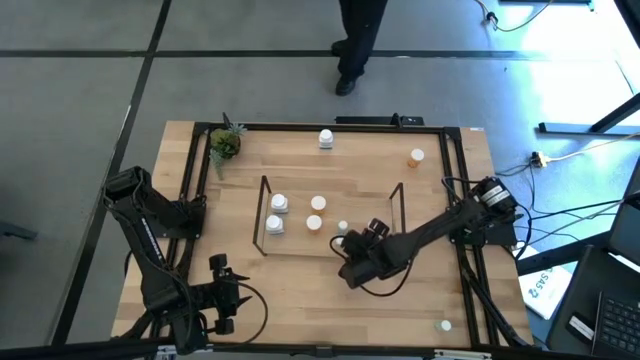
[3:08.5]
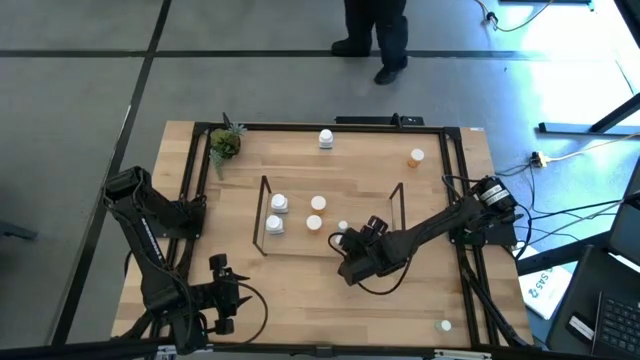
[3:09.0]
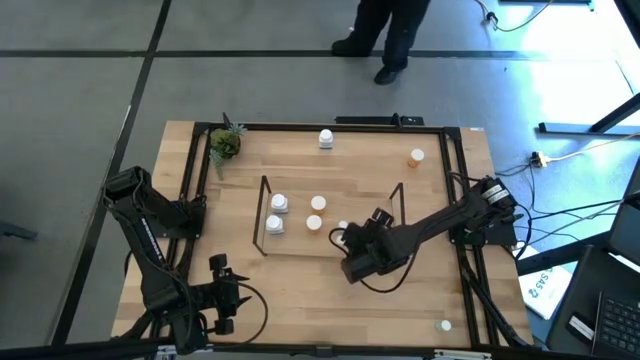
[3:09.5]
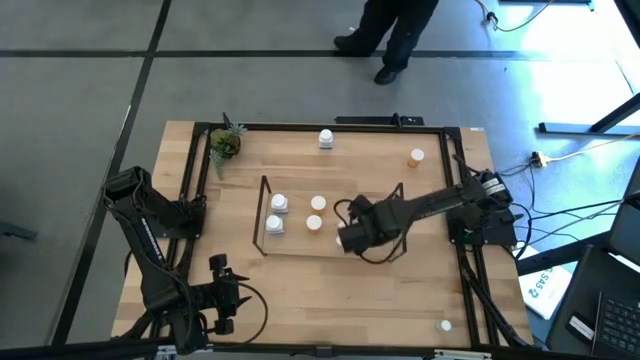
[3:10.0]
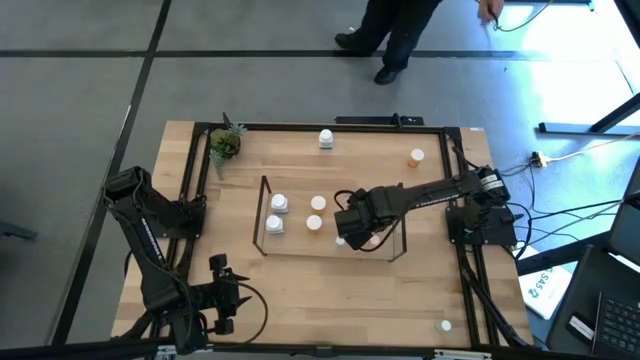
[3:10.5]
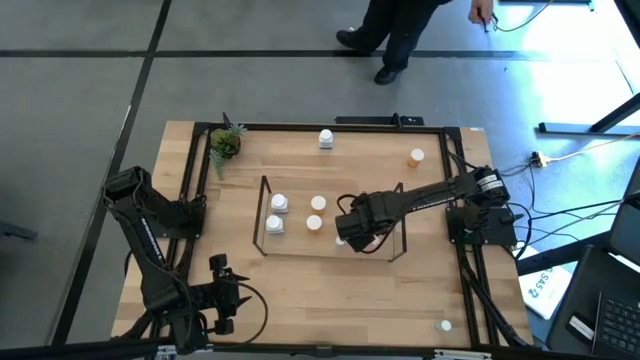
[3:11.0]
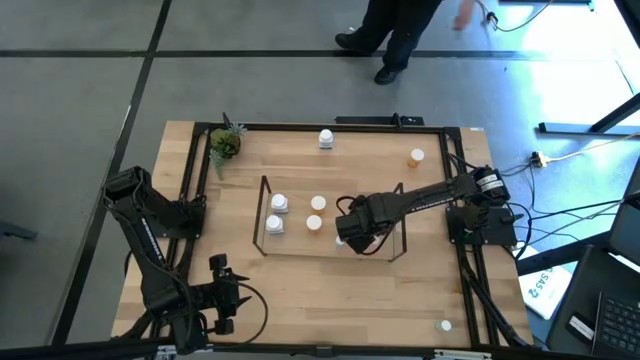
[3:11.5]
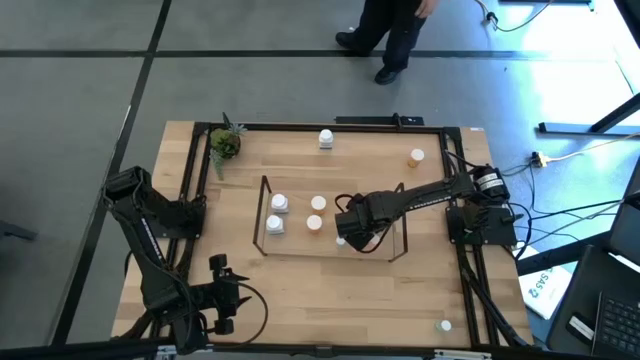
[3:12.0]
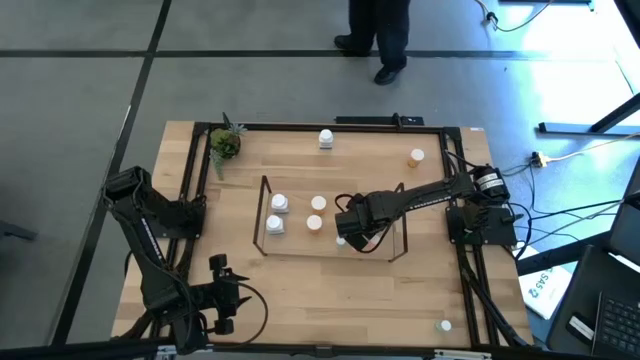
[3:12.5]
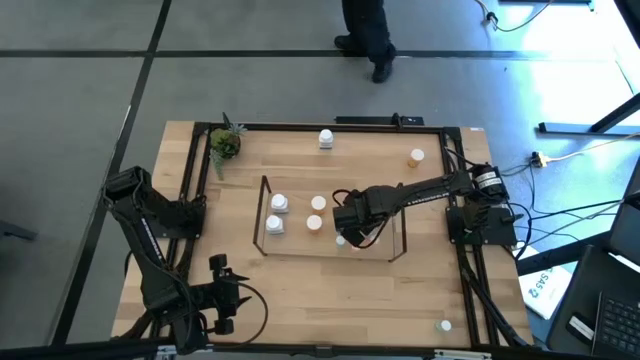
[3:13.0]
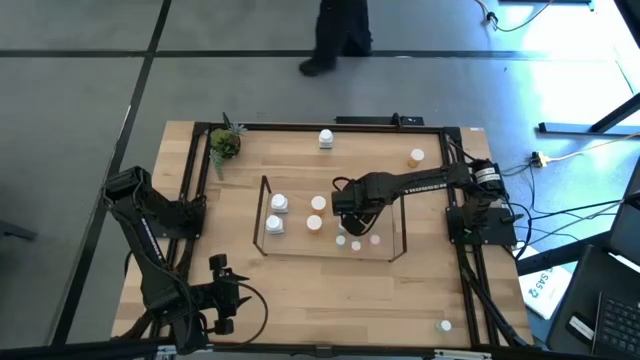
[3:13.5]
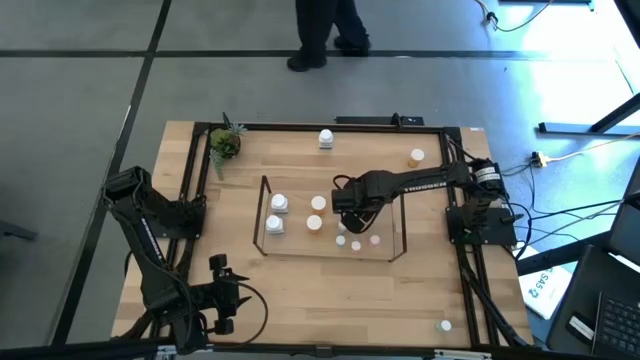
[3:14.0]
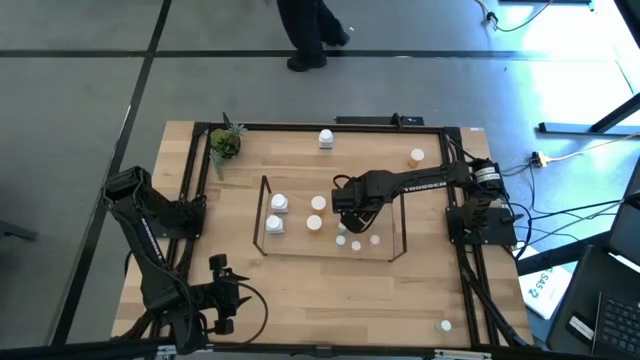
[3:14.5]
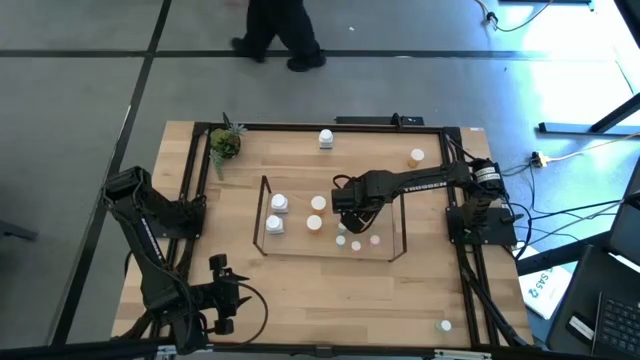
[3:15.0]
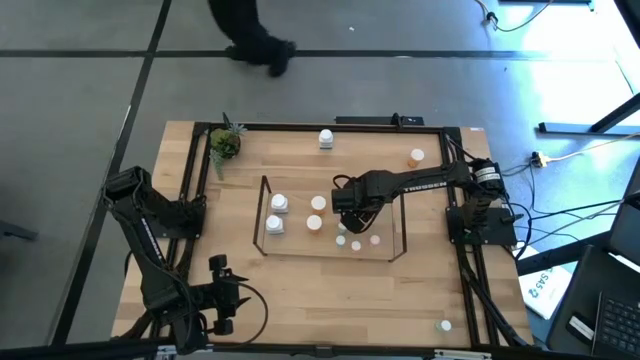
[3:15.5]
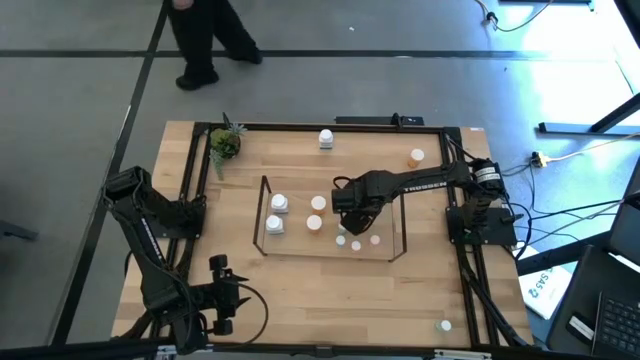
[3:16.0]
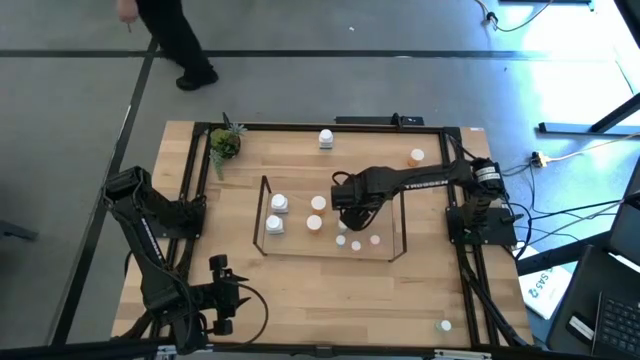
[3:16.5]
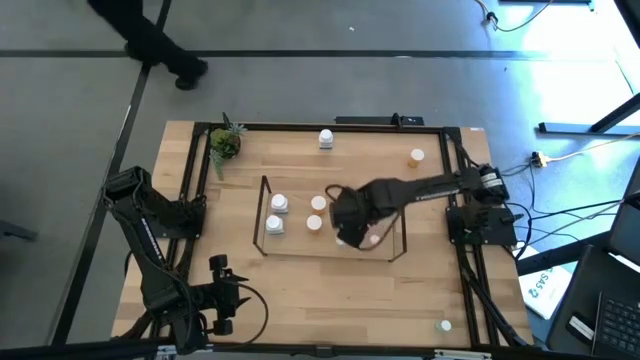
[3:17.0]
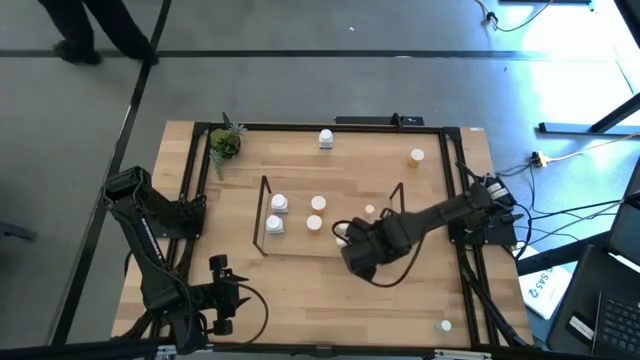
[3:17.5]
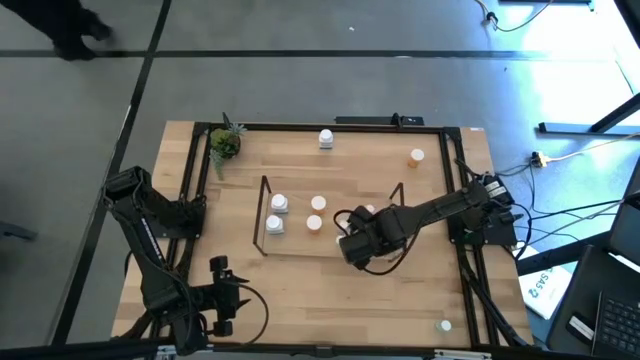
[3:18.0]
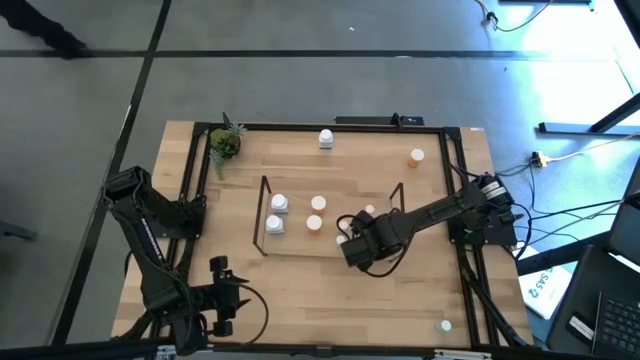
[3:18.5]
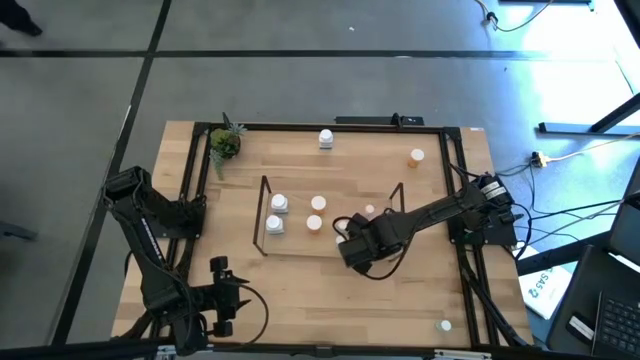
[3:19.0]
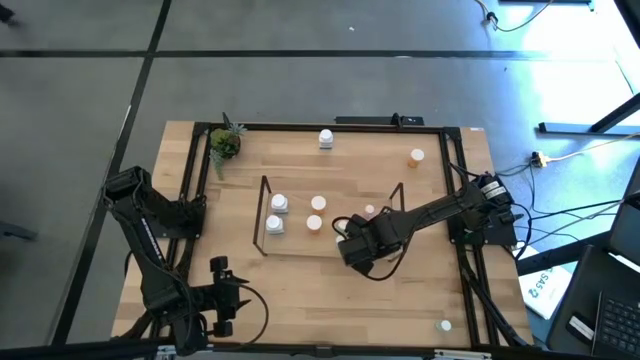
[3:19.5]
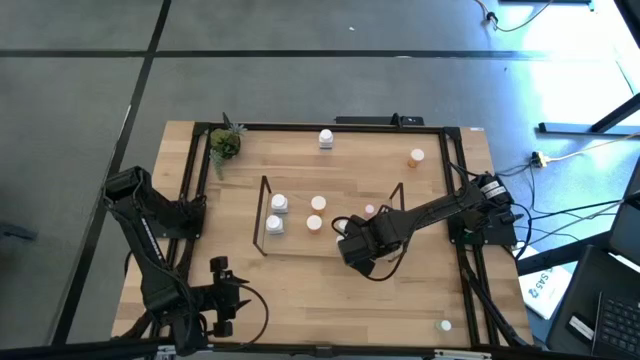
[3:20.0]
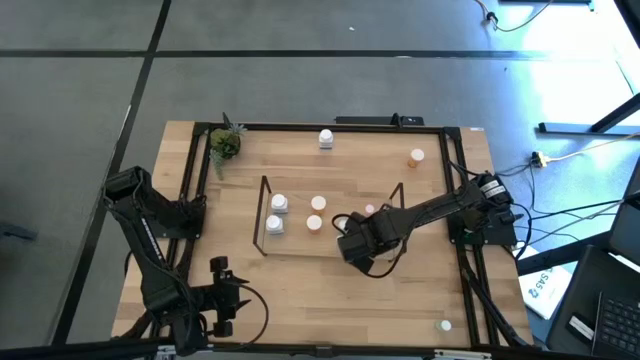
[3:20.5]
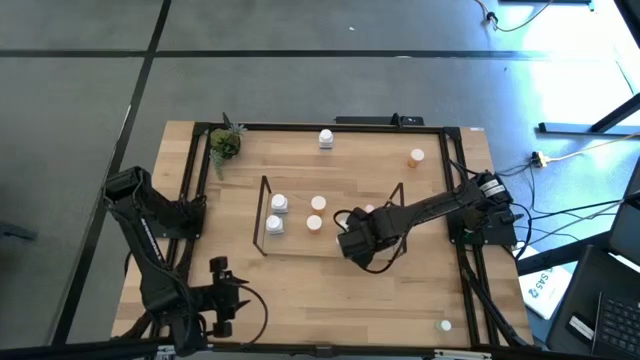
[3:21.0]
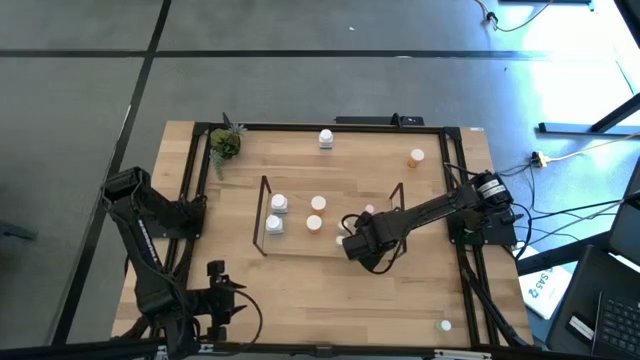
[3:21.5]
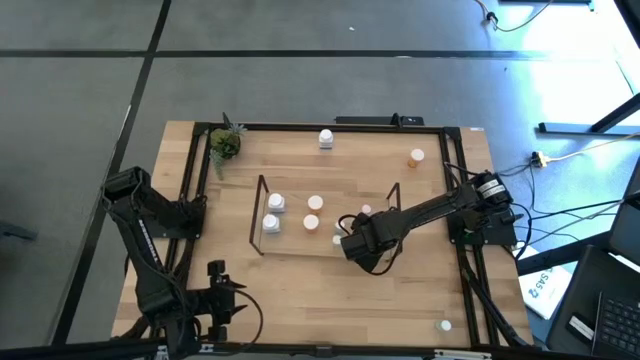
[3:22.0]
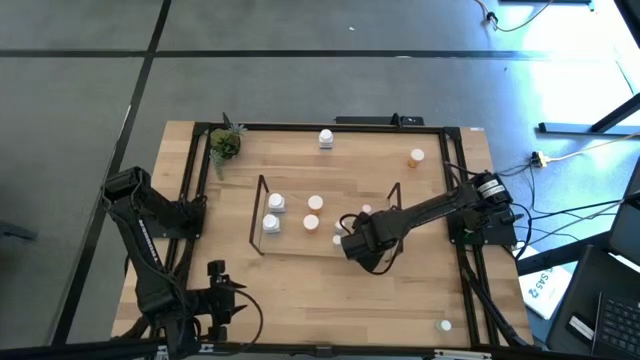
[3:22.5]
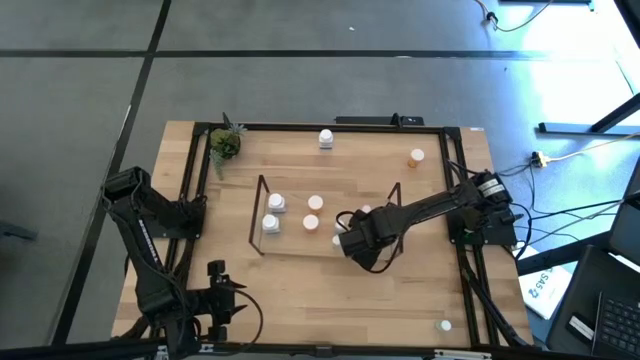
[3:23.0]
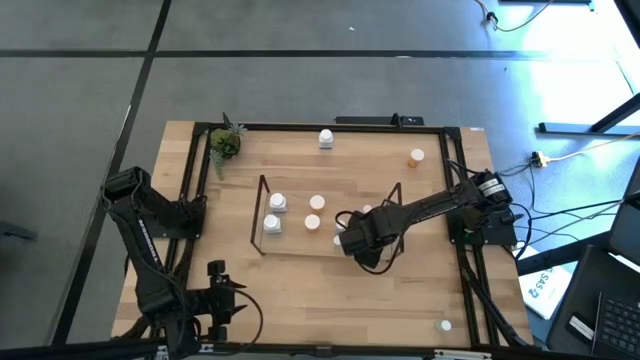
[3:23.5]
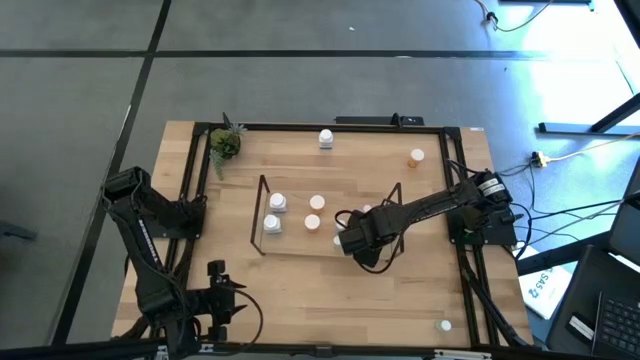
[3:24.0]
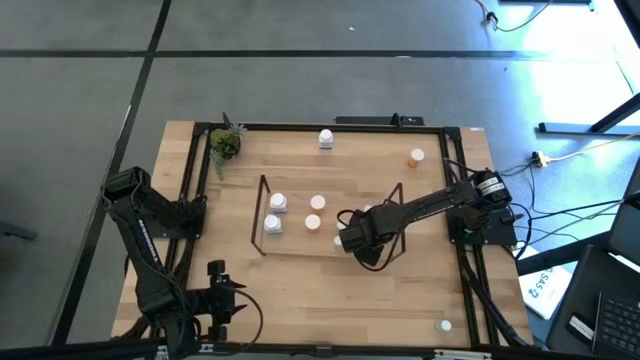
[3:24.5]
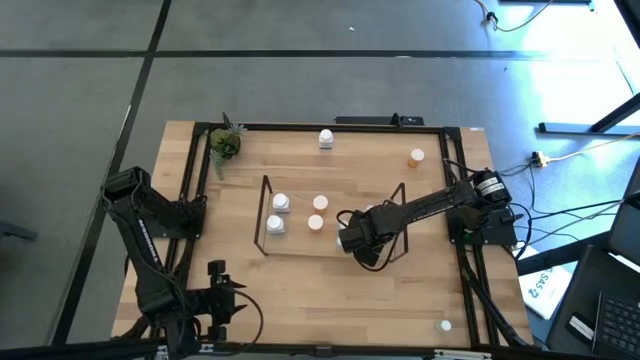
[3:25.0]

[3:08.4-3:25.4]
Task: Pick and place medicine bottles onto shelf by color
Adjust the pink pill bottles on the shelf

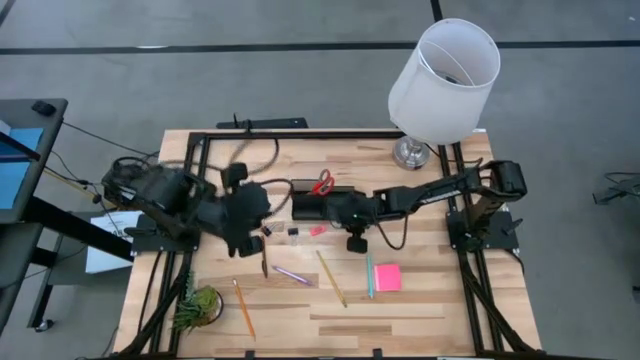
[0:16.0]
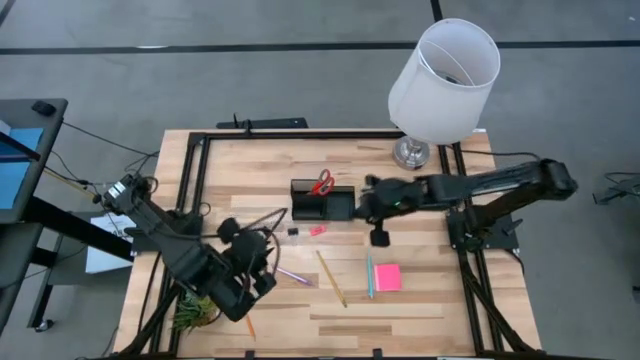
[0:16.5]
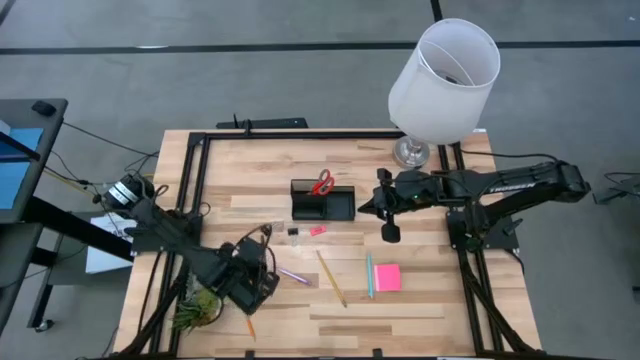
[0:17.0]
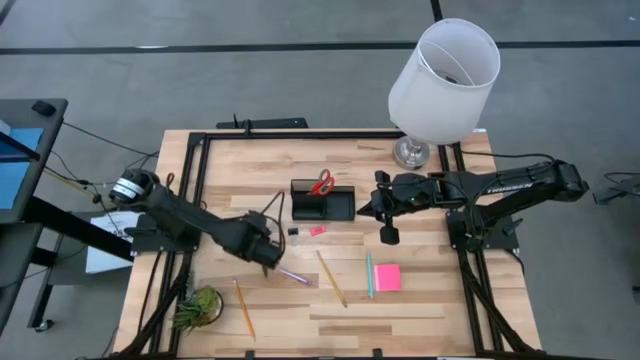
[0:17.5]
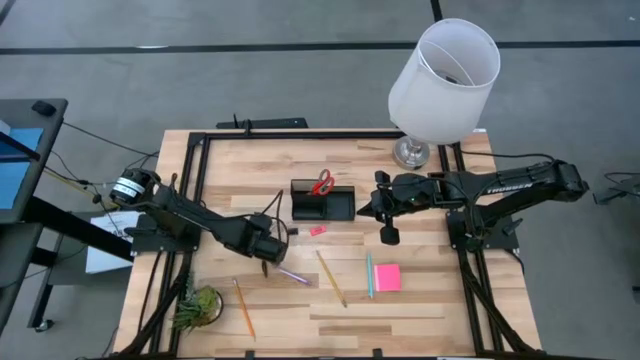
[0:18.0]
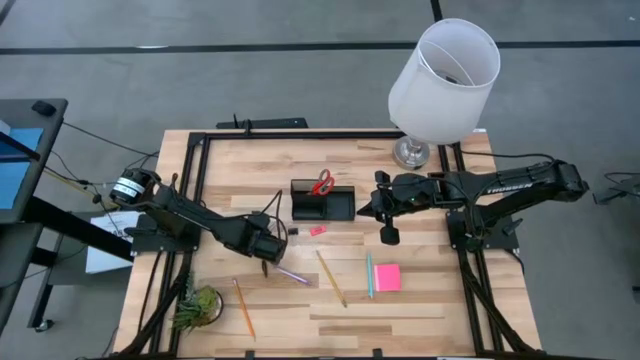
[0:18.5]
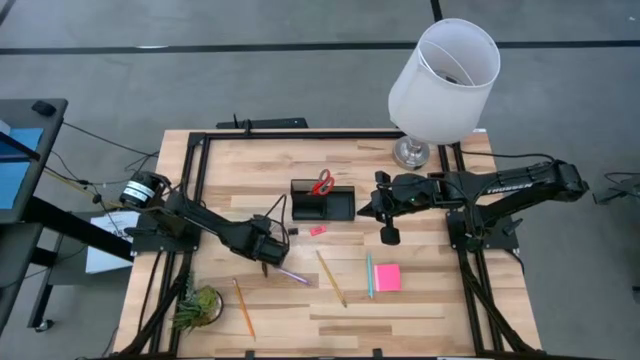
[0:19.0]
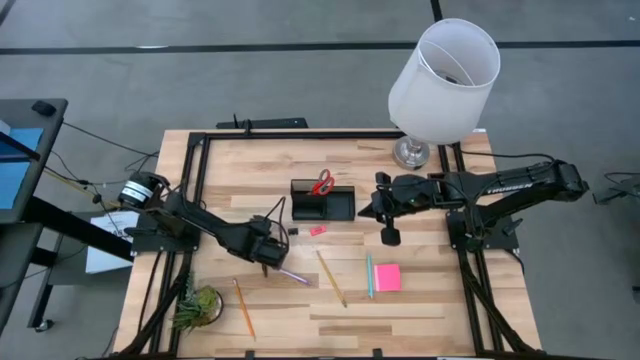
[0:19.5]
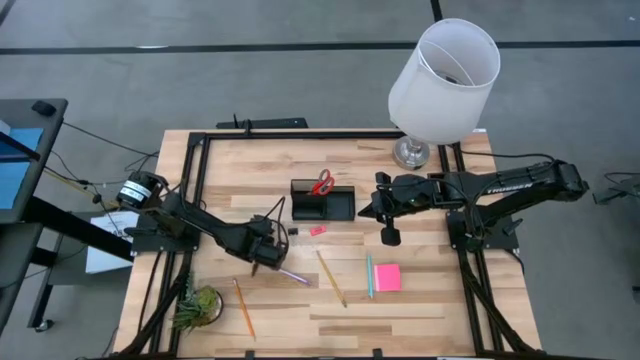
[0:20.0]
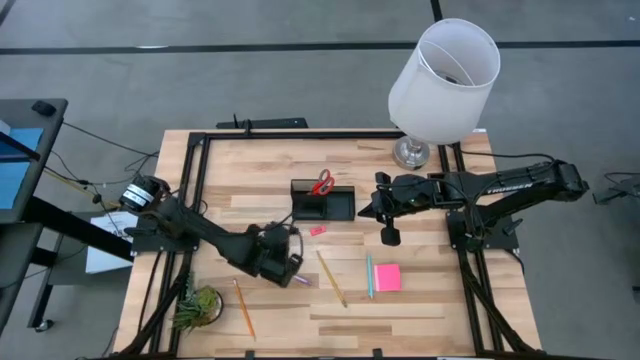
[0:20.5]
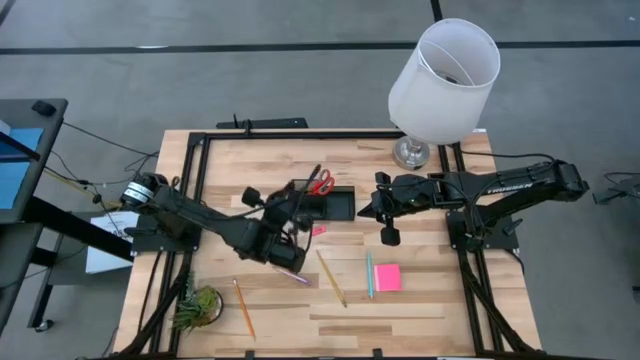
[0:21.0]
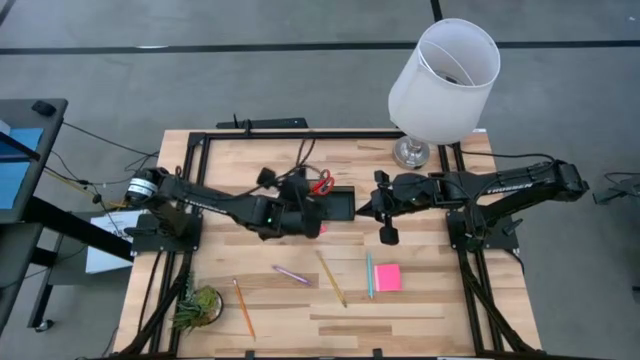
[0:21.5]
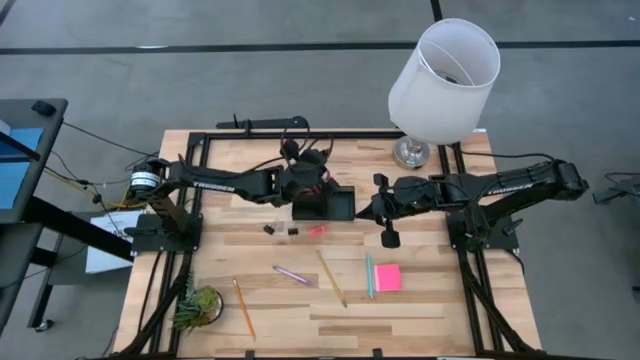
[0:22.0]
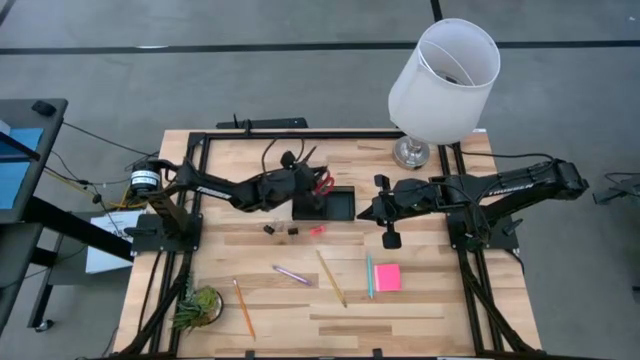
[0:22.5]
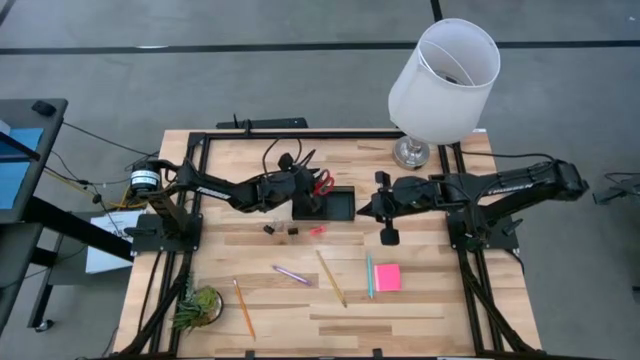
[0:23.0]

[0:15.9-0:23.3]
Task: Pick and place office supplies into organizer
Put the brown pen into the top left compartment of the black desk organizer
